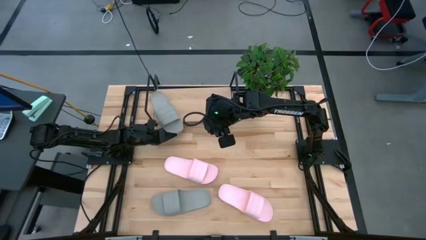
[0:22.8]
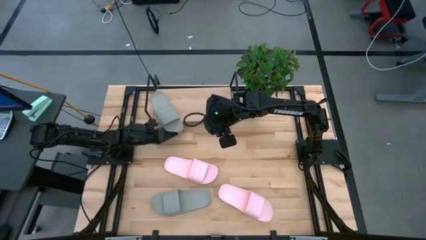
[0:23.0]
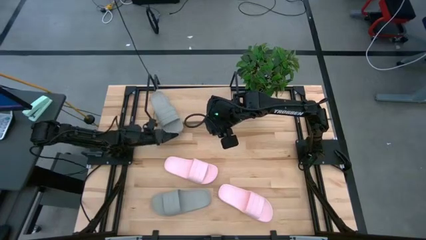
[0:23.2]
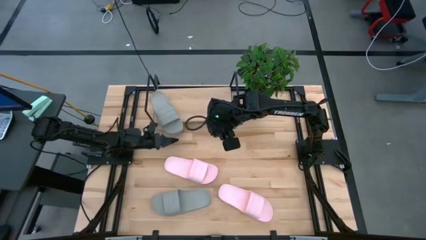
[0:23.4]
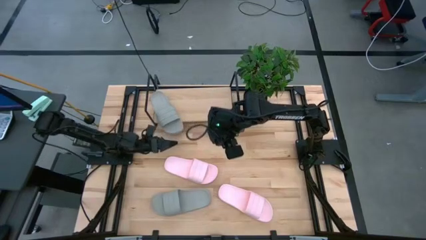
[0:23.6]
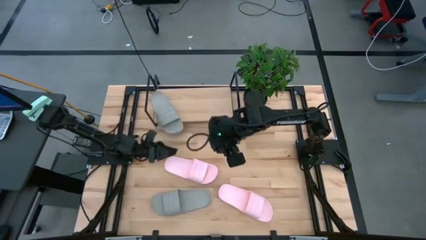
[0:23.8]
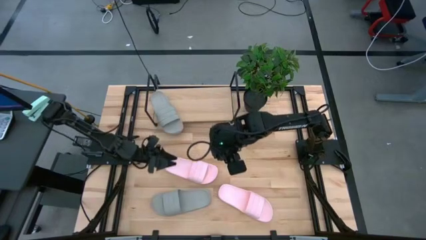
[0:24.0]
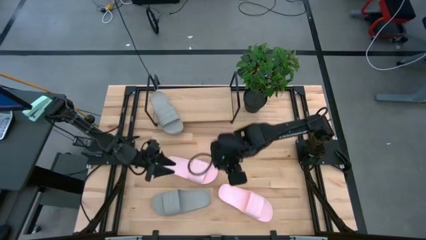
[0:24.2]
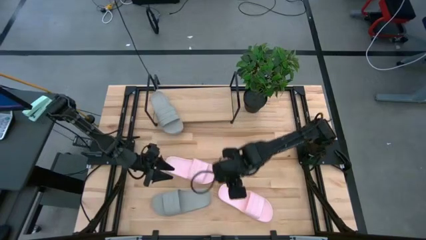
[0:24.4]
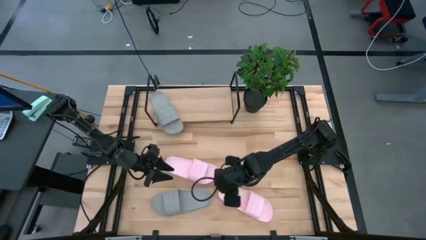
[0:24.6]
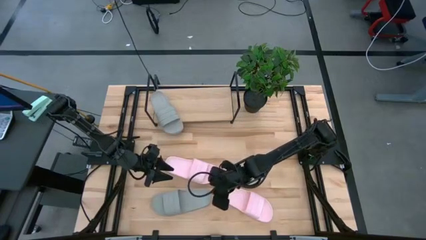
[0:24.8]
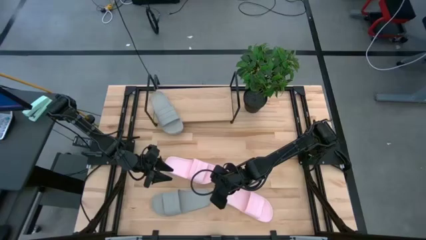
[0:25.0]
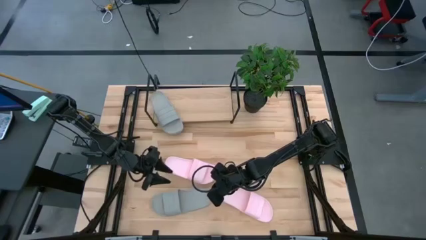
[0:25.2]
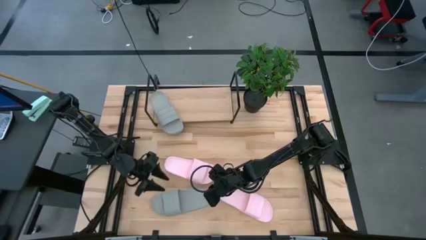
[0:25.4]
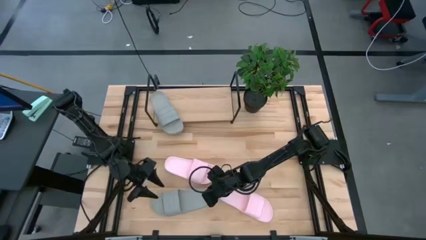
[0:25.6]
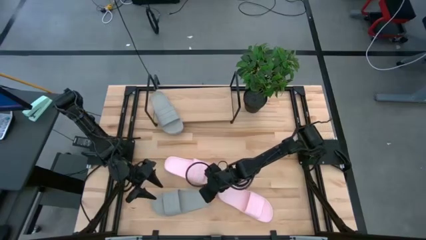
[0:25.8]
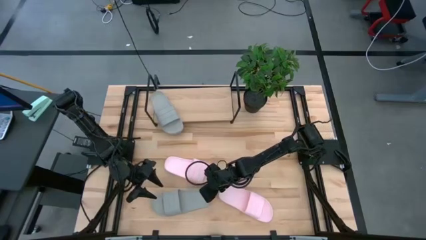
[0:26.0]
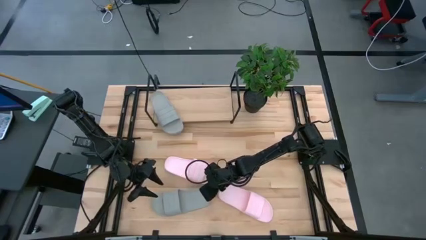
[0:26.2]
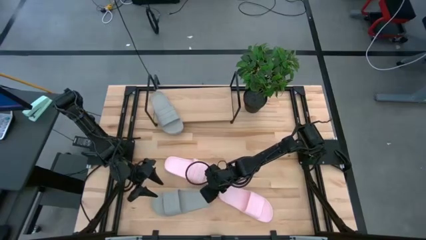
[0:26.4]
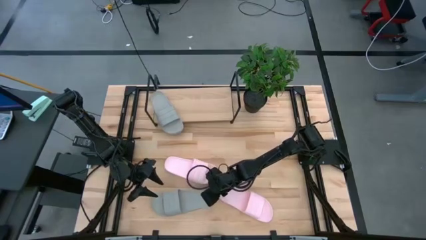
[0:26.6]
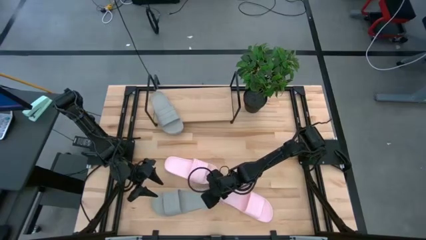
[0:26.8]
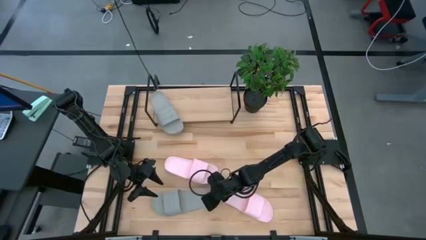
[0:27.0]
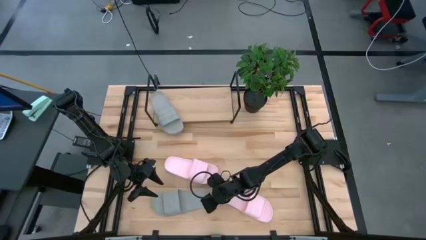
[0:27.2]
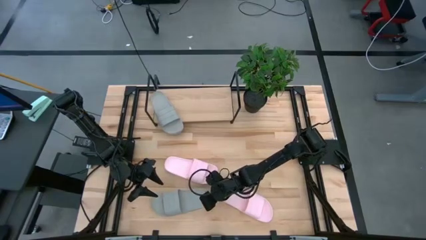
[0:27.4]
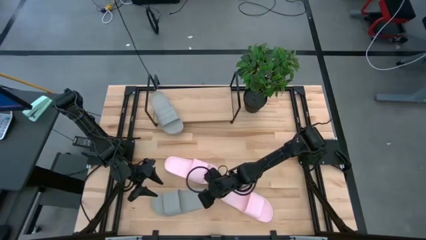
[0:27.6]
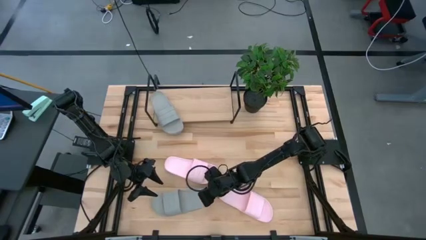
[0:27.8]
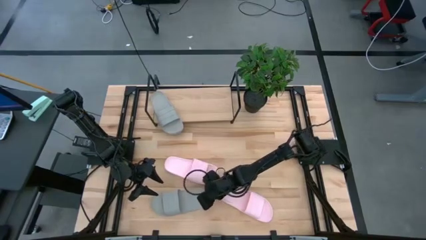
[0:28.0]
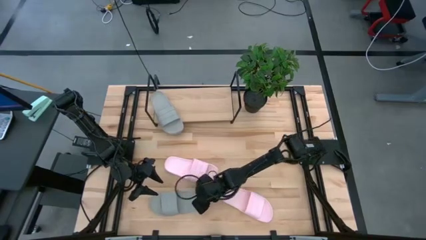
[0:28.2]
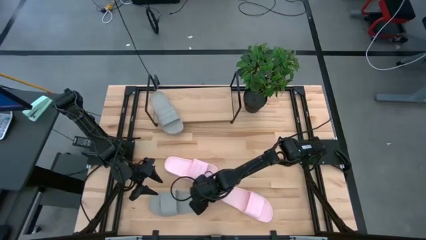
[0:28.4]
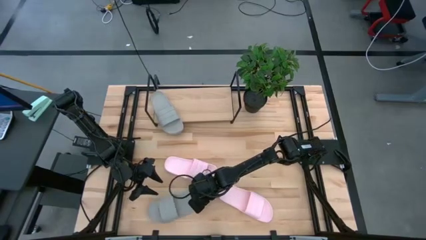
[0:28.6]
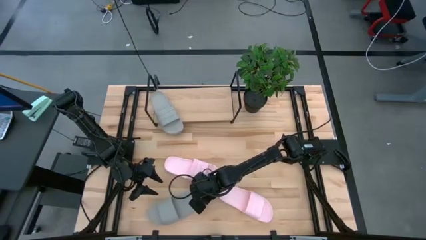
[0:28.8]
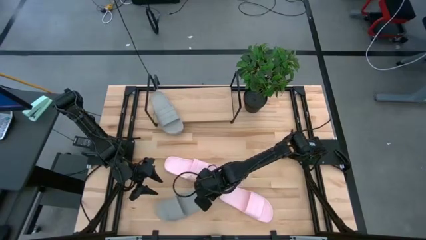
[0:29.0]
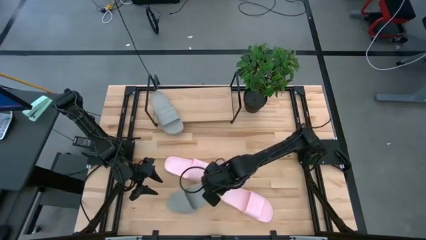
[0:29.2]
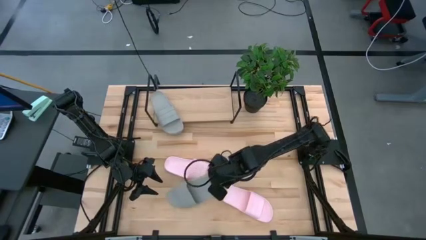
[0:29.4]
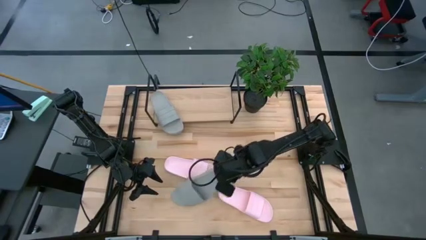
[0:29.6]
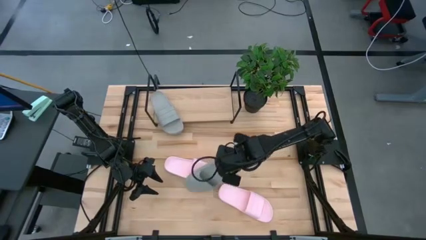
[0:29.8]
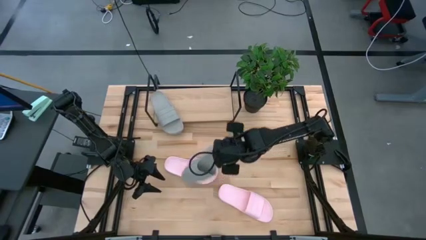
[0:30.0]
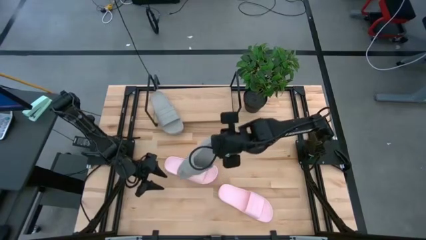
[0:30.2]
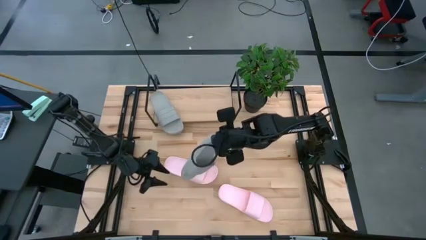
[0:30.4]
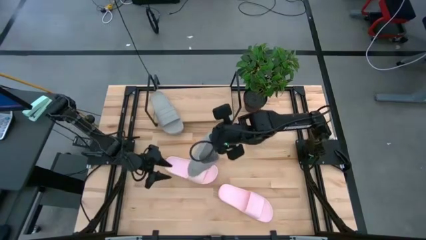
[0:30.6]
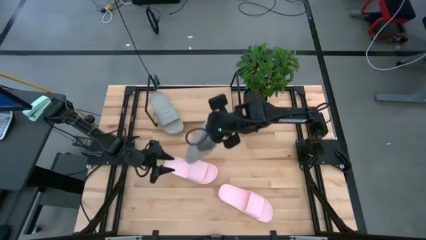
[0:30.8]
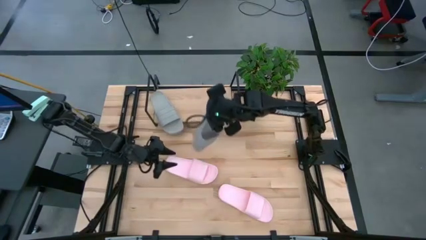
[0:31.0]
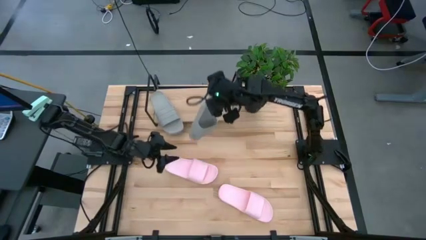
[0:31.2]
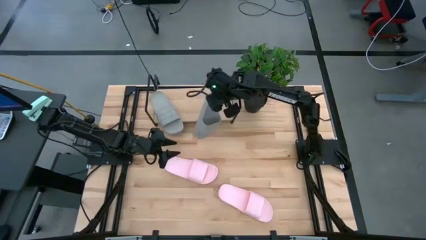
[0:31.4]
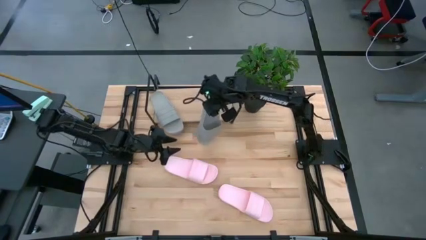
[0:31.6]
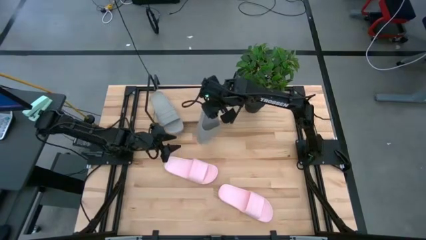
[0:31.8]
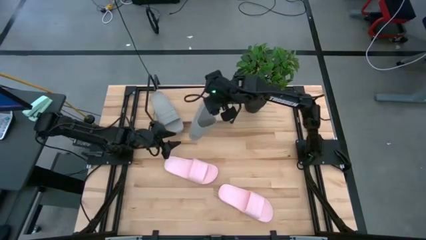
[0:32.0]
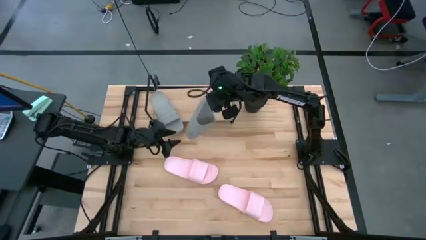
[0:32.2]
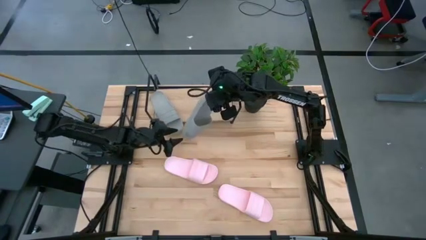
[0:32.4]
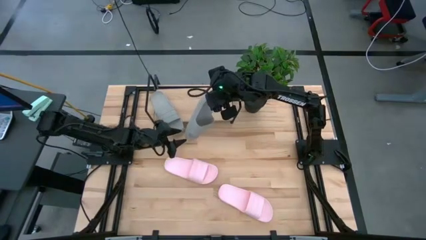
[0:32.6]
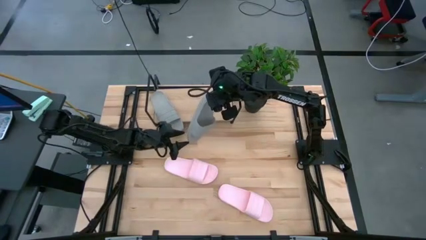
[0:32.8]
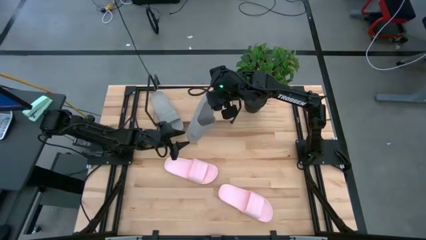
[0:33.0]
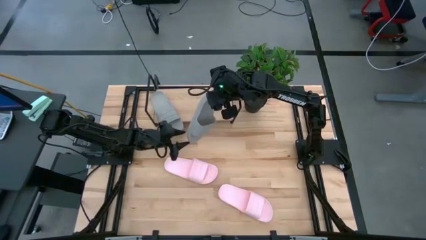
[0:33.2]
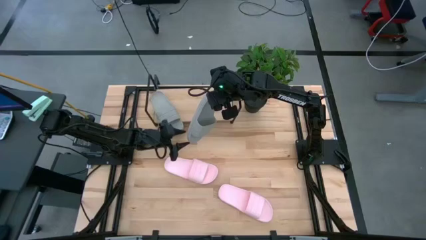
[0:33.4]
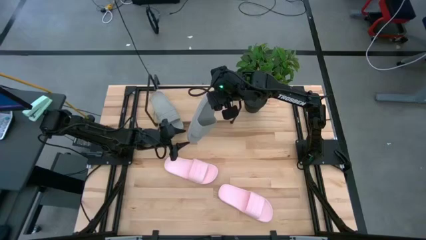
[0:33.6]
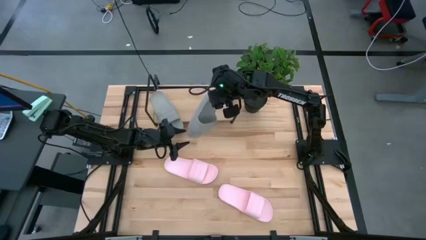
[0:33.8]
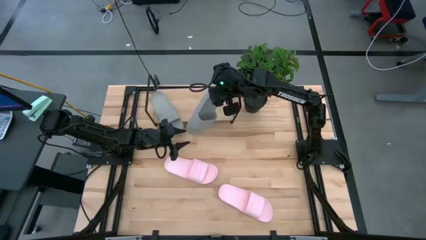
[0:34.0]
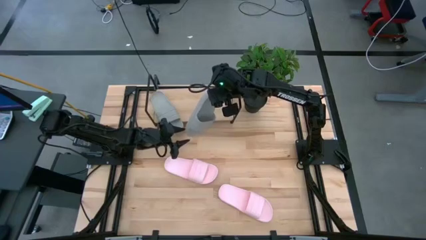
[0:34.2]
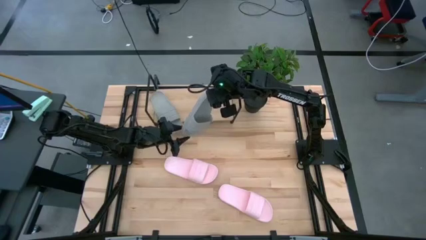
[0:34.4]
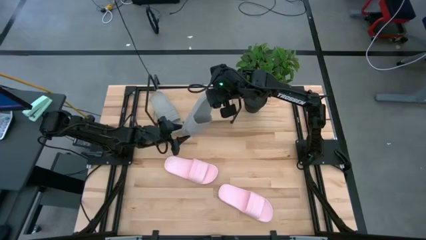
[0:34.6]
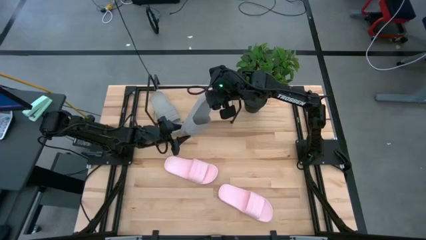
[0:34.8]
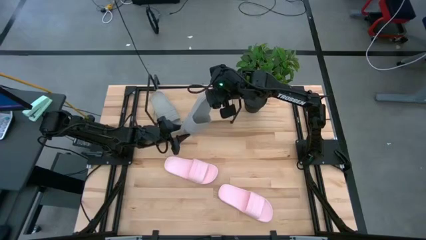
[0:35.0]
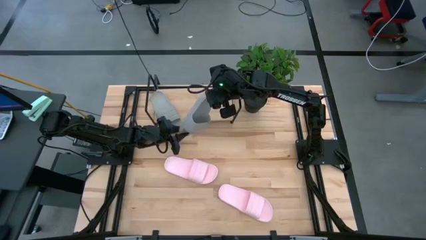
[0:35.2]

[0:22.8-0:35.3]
Task: Pick and place slides into the shelf
Put the gray slide on the shelf

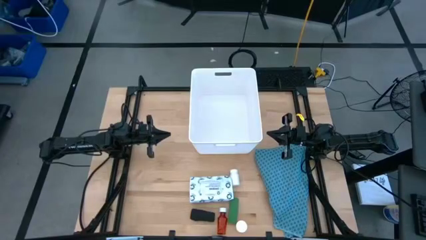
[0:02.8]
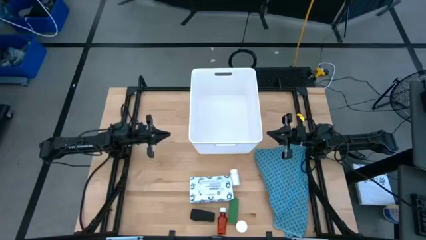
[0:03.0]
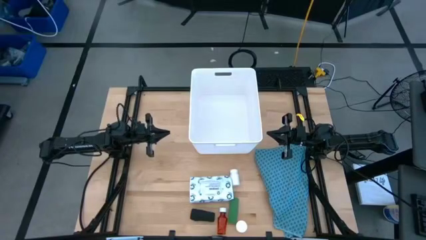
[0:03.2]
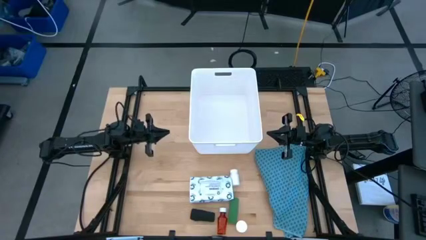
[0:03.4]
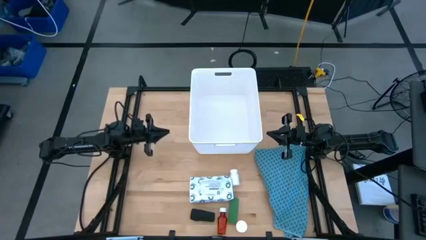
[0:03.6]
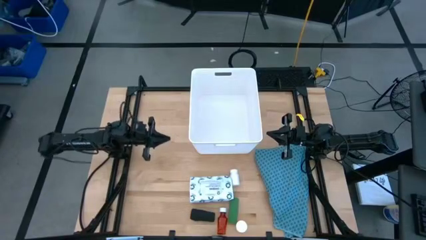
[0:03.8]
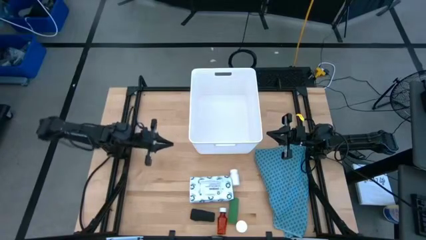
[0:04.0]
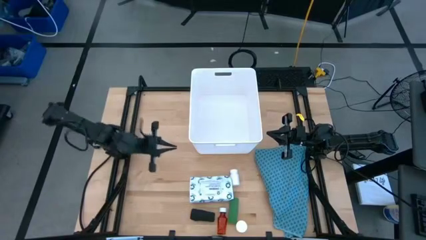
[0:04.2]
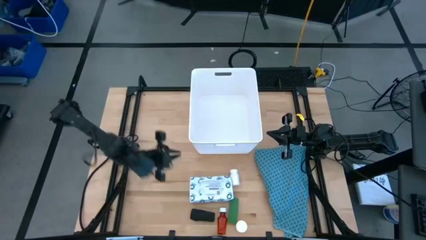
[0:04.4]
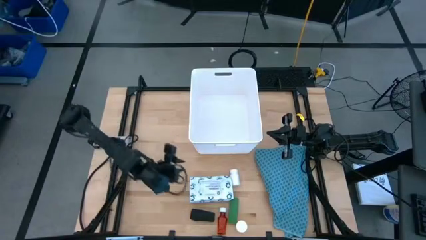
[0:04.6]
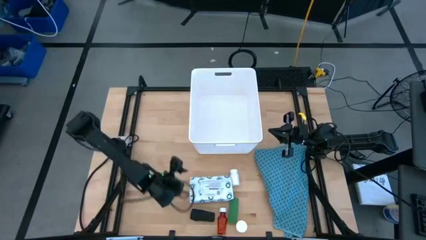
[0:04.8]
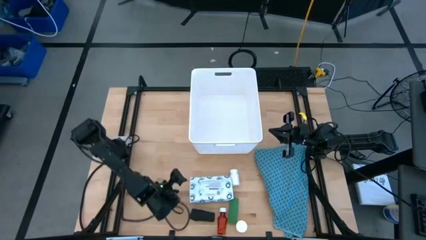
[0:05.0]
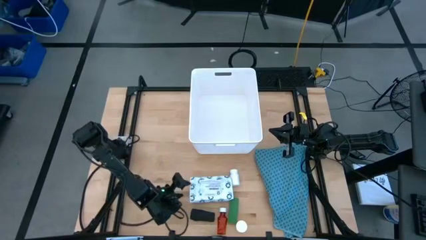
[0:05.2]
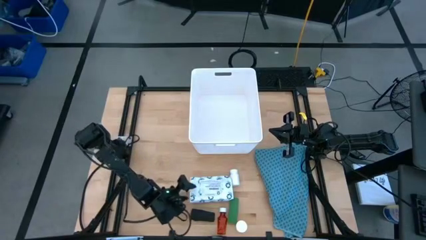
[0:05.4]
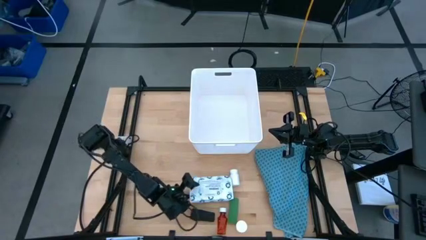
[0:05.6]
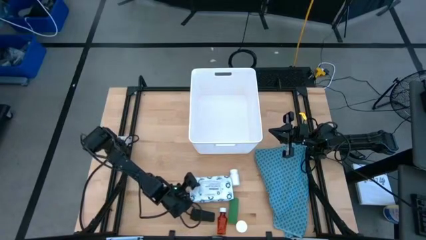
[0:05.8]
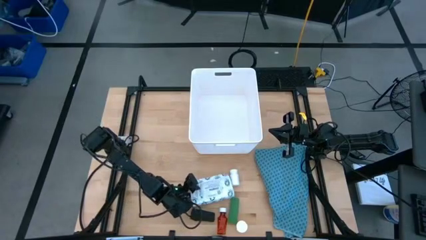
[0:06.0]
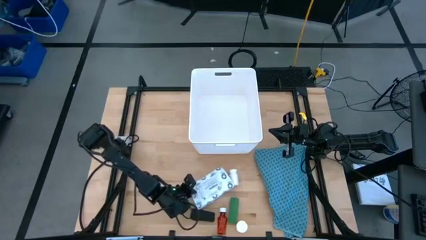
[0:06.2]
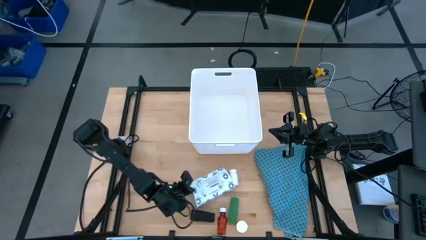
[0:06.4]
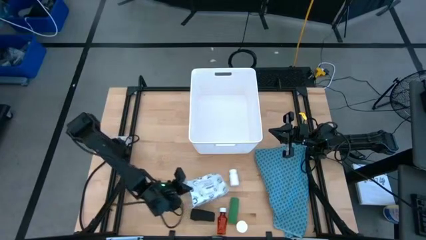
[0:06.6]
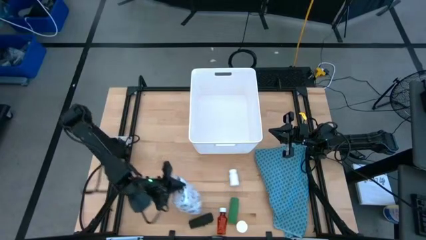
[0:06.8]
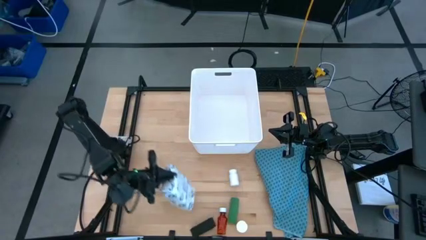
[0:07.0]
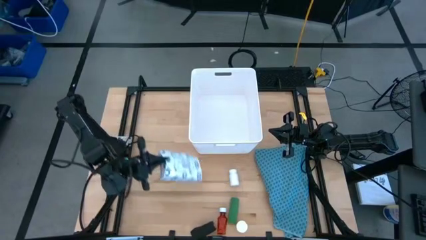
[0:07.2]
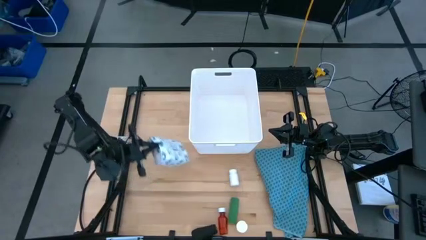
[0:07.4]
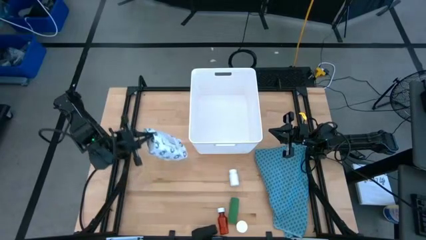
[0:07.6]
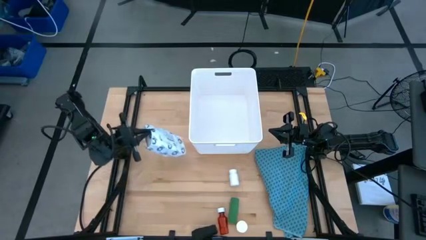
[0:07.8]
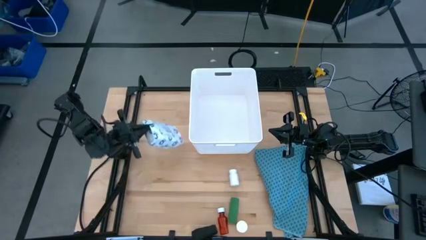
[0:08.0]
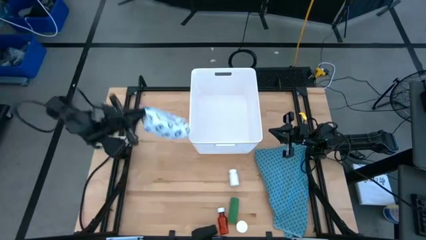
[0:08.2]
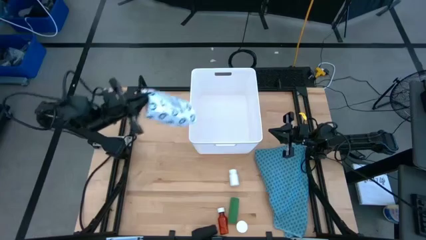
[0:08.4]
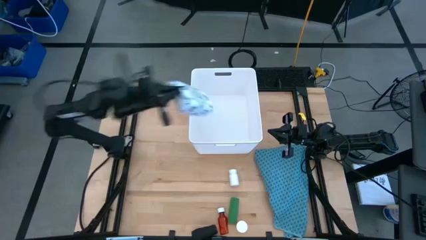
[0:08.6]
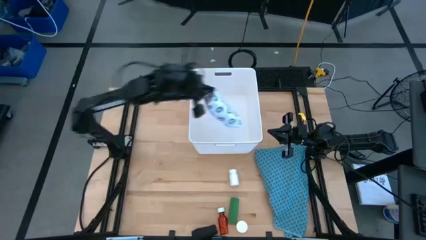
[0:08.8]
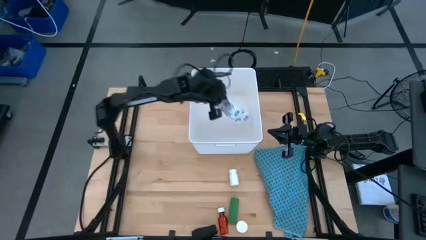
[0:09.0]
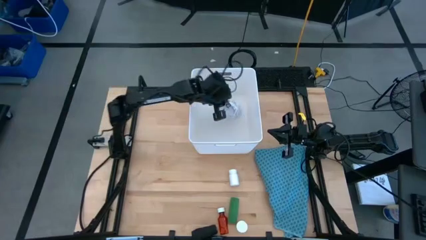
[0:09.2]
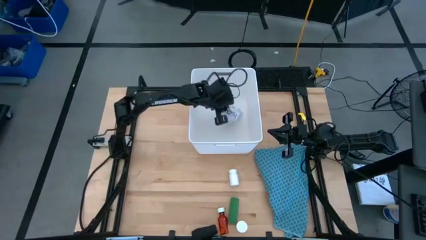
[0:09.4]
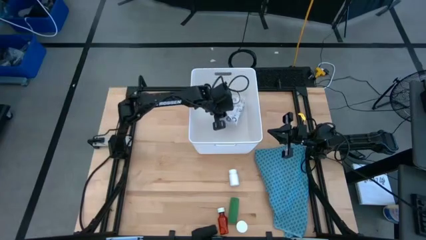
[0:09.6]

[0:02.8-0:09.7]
Task: Pick & place medical supplies in basket/bin
Put the white mailer bag into the white bin
